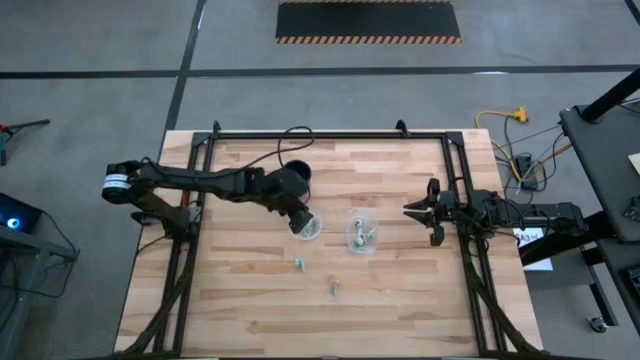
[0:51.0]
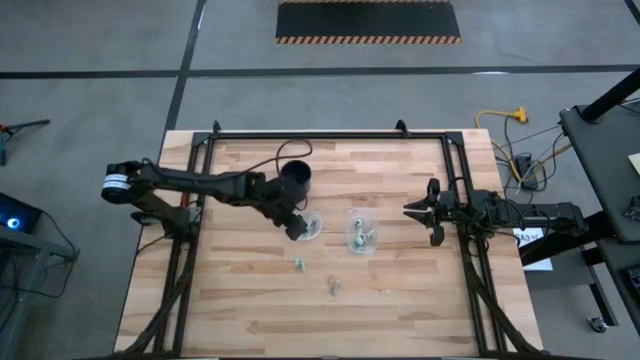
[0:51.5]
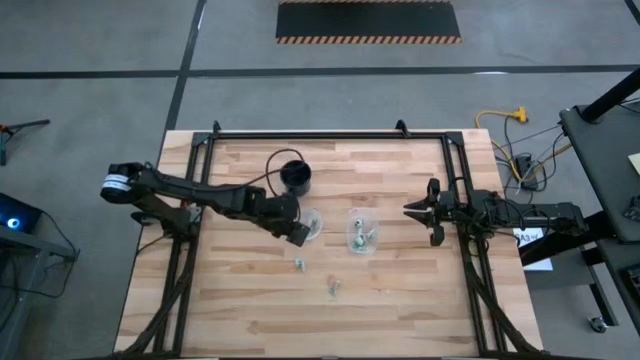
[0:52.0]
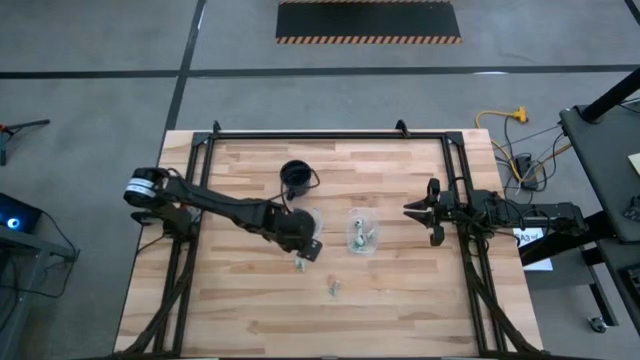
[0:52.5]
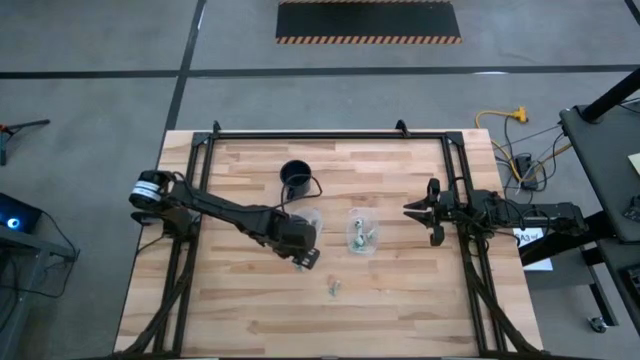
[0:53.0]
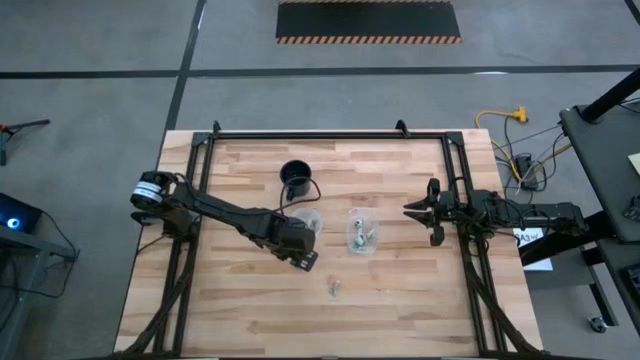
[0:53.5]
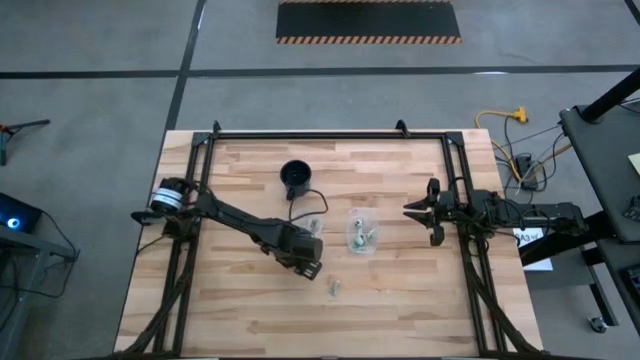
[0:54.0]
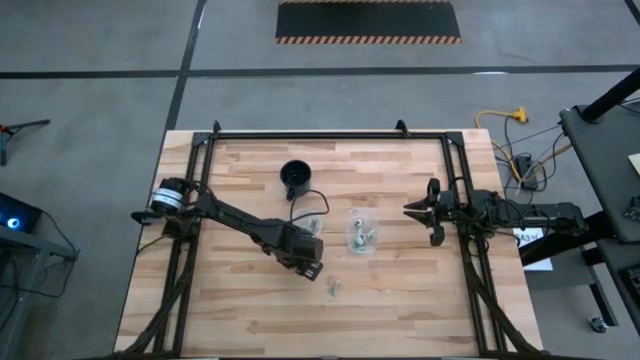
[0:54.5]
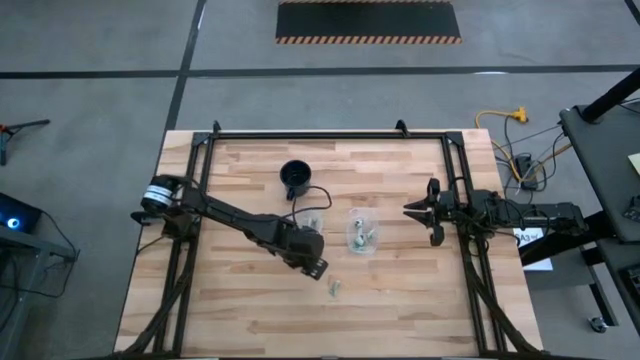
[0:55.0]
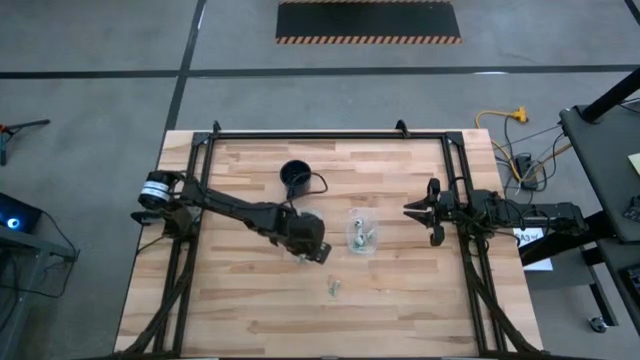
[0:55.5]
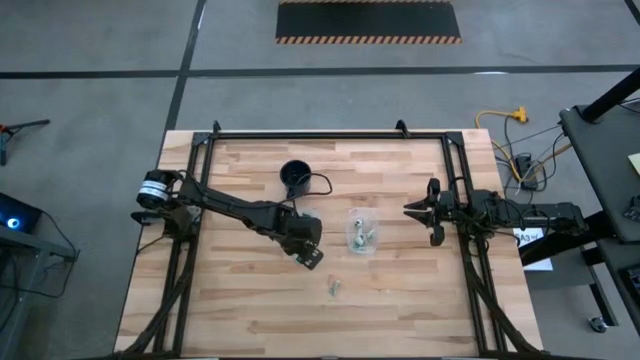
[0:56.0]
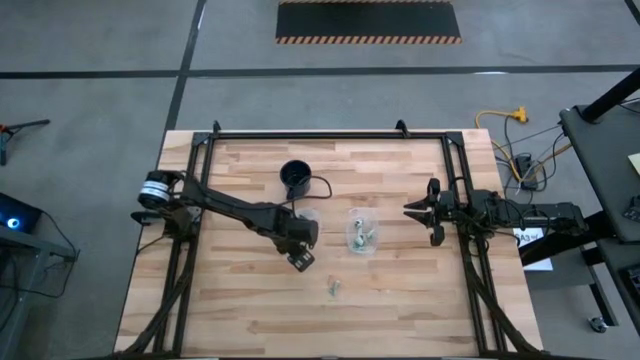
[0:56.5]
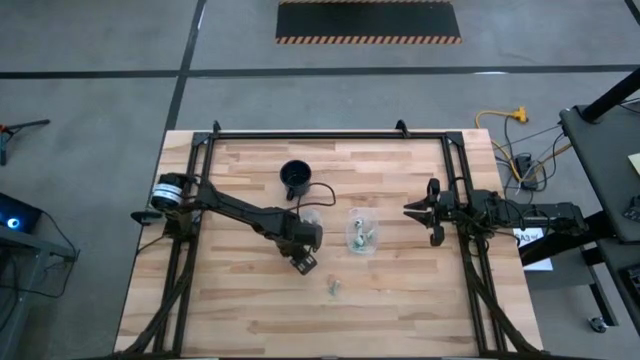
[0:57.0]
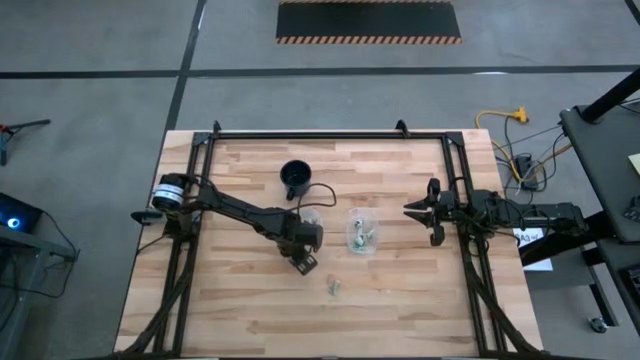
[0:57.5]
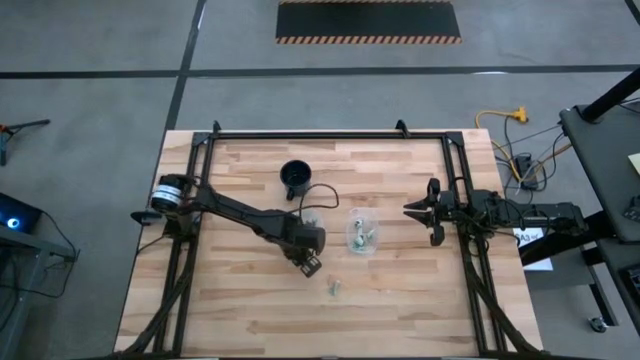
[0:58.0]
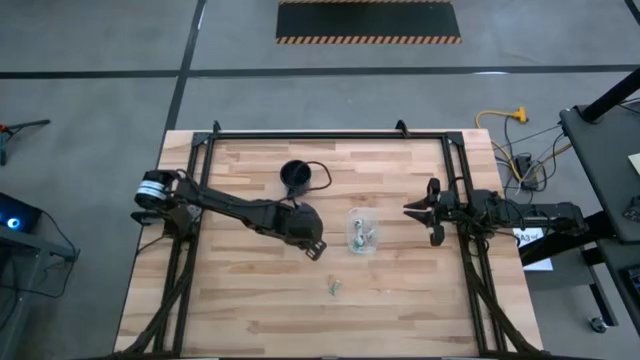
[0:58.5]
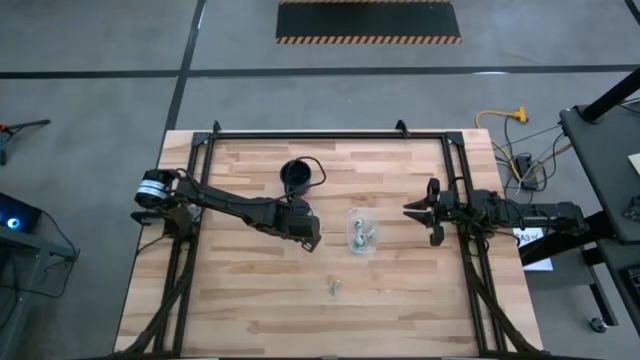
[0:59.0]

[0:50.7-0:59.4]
Task: Pick and place Stevia / Truvia into bins
Put the stevia packet into the round transparent container

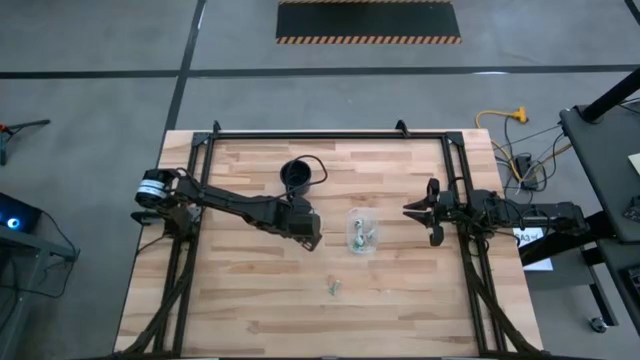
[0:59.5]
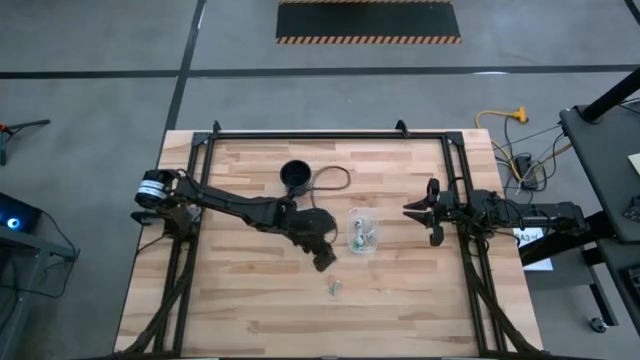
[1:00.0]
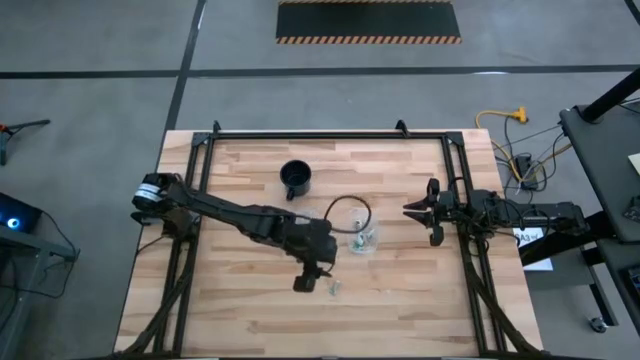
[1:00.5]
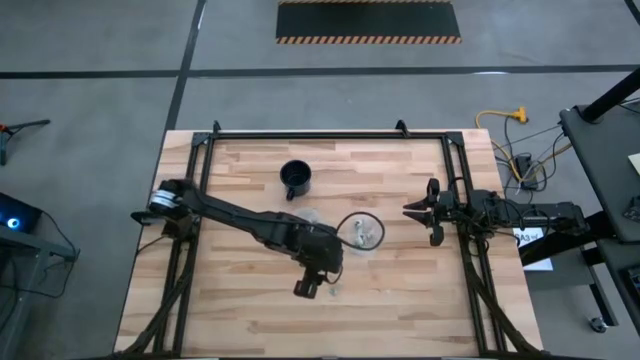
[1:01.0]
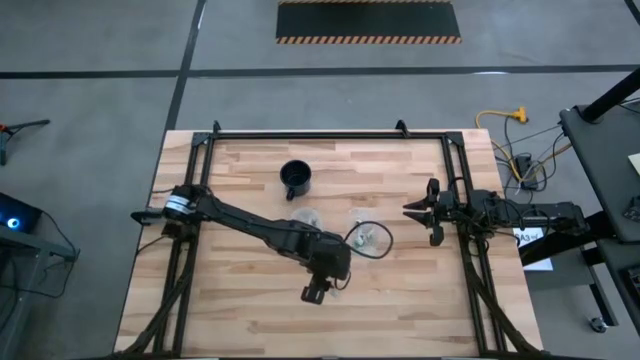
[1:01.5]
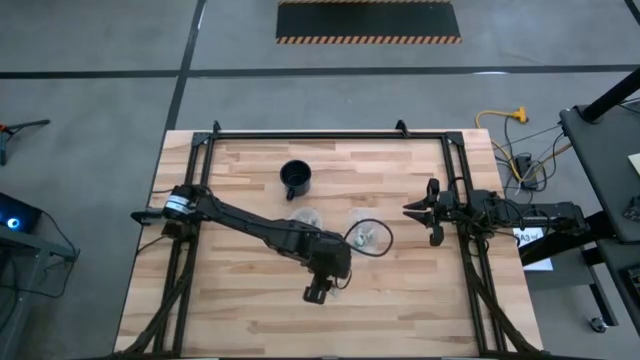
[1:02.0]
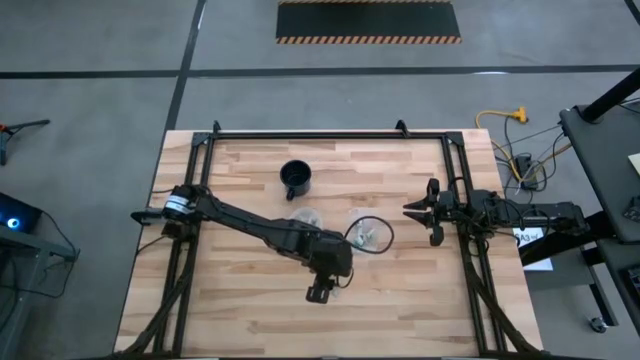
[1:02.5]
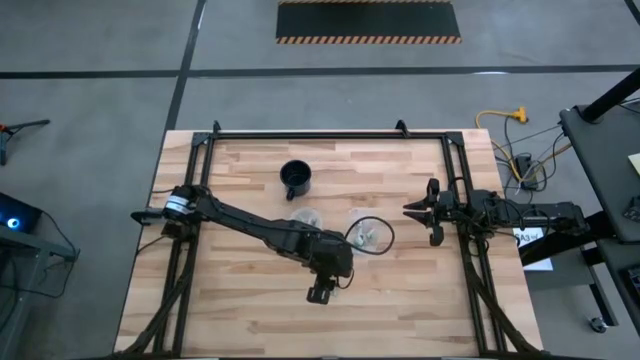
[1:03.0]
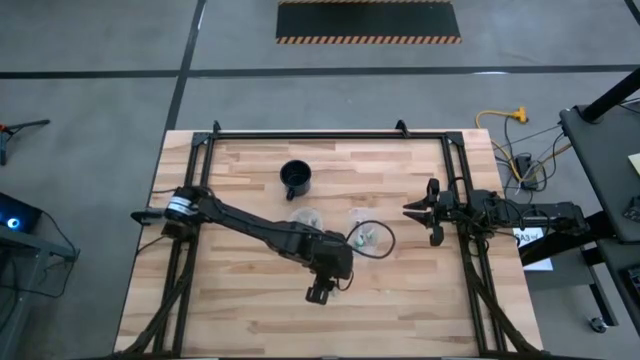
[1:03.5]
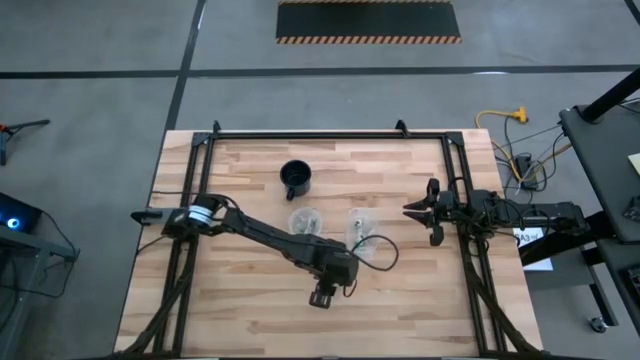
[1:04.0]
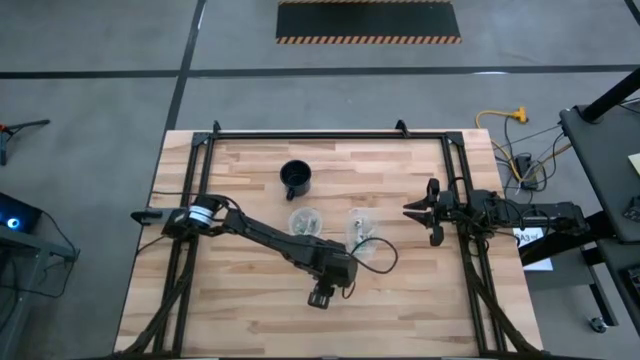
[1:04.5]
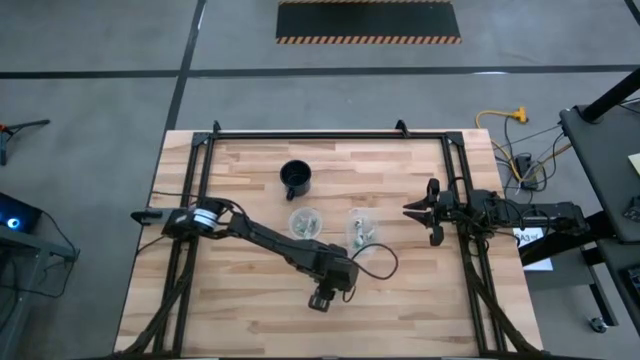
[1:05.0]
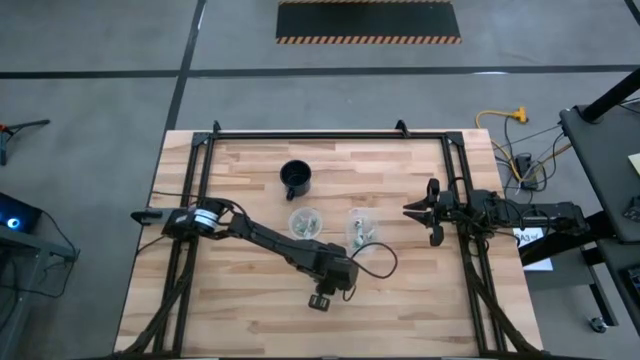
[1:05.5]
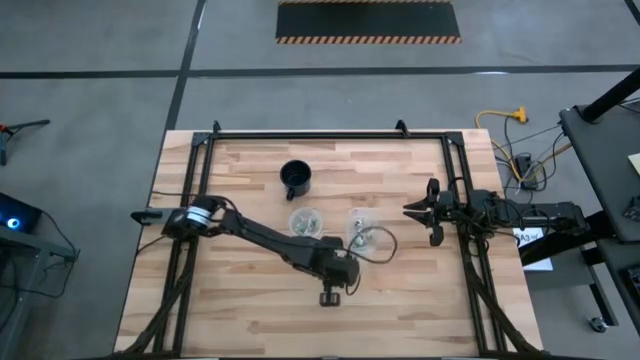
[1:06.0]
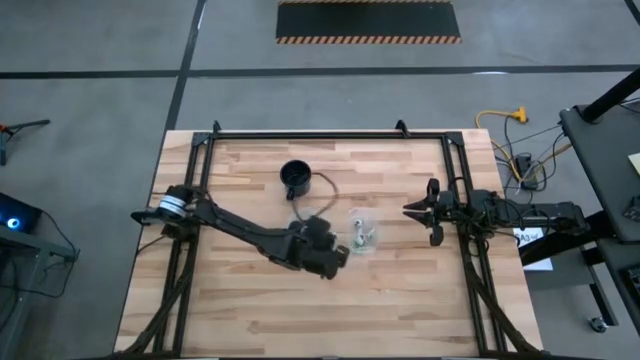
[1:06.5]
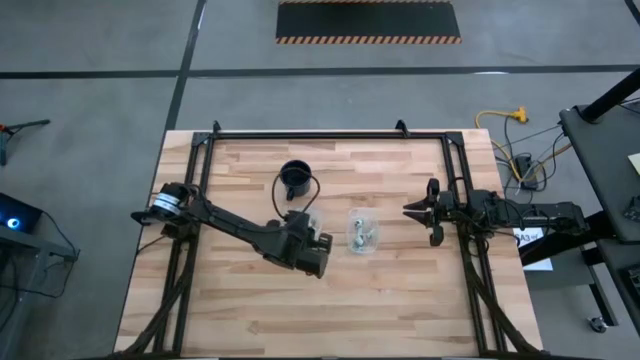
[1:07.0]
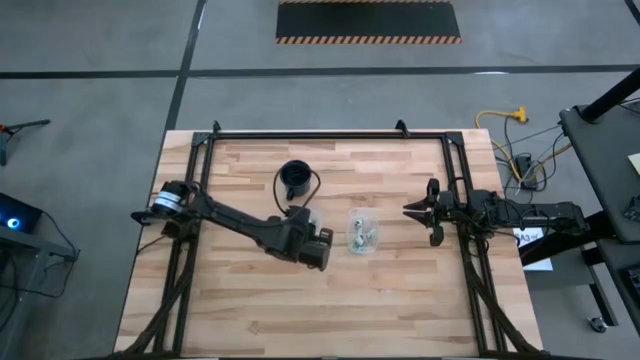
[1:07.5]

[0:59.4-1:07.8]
Put the stevia packet into the round transparent container

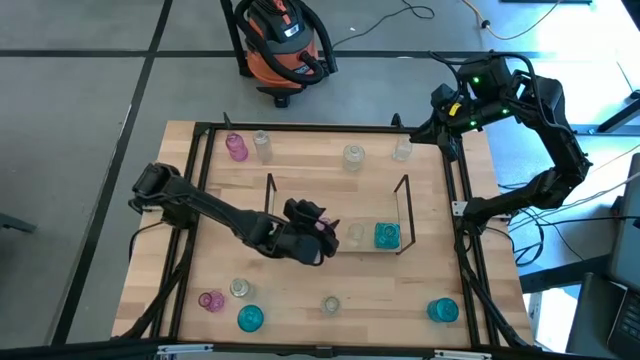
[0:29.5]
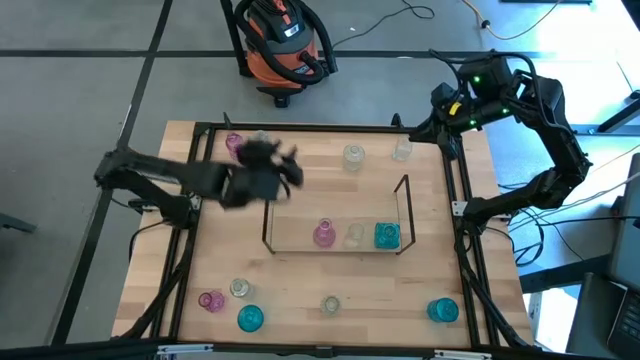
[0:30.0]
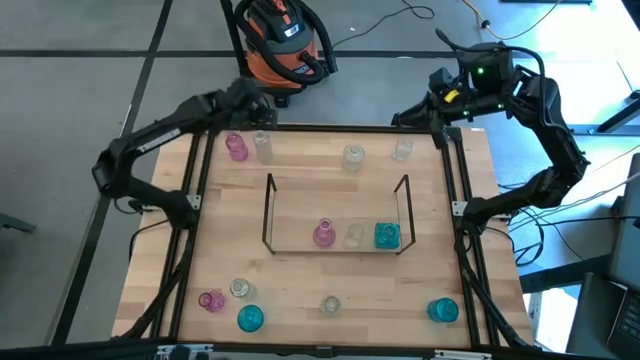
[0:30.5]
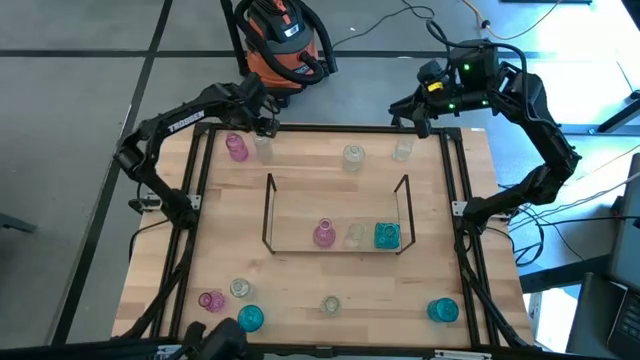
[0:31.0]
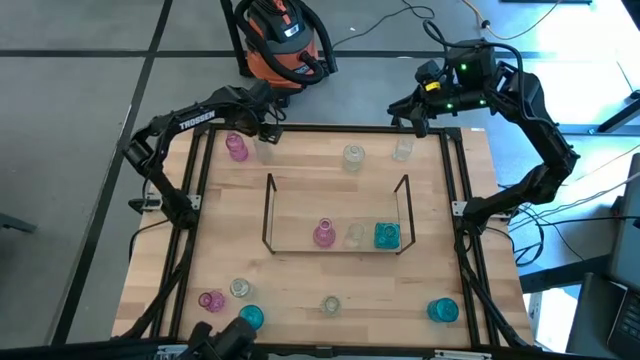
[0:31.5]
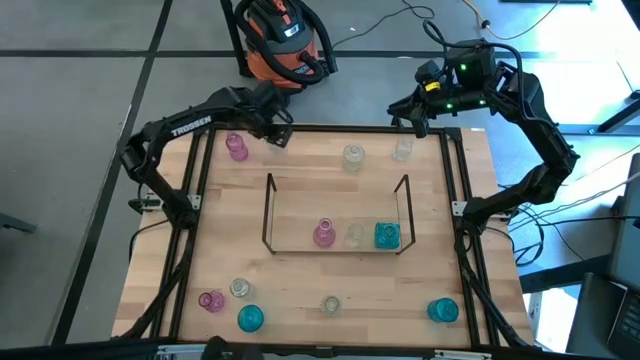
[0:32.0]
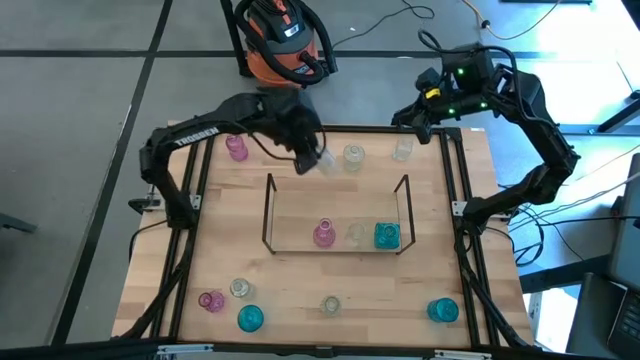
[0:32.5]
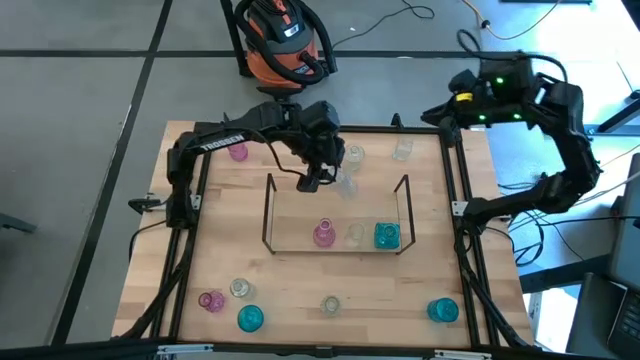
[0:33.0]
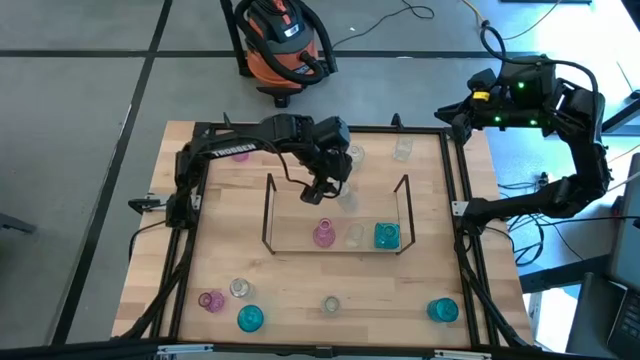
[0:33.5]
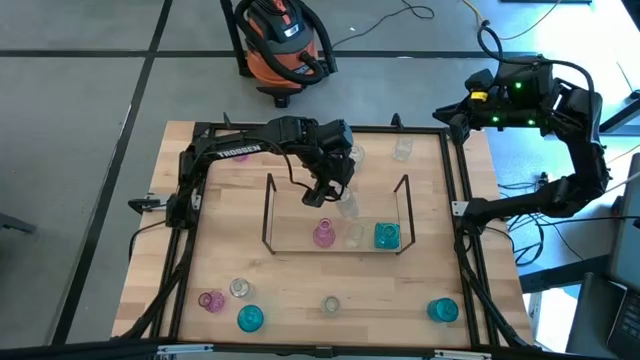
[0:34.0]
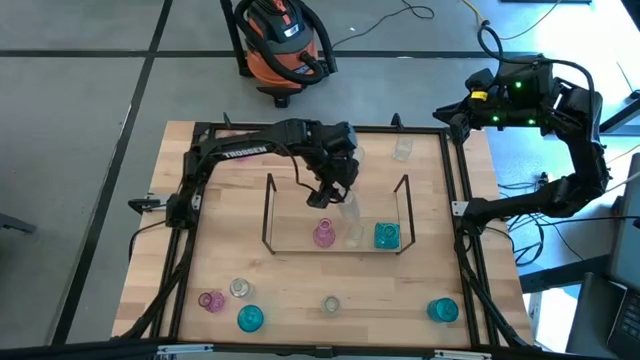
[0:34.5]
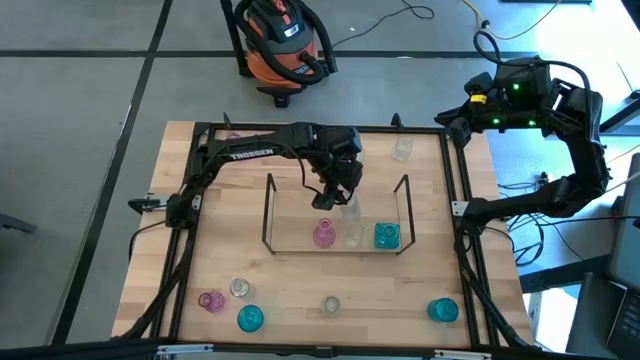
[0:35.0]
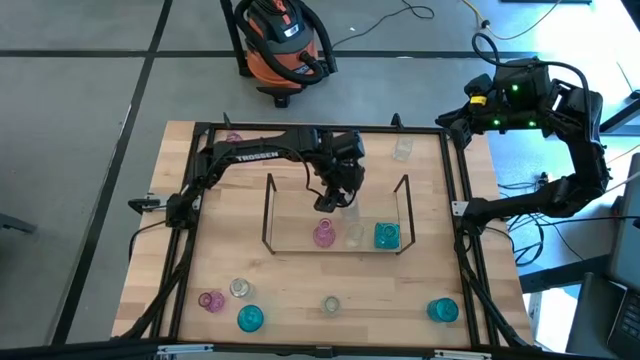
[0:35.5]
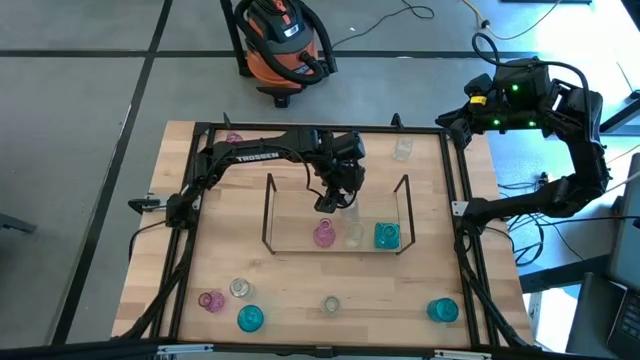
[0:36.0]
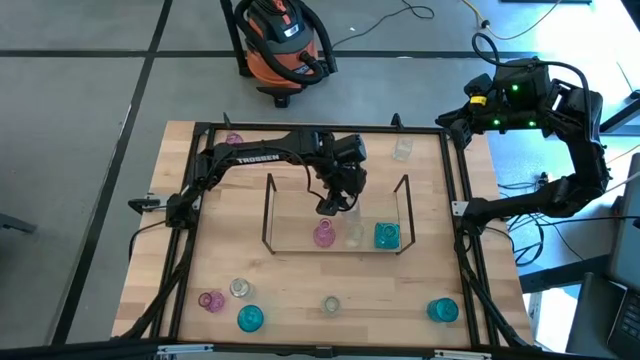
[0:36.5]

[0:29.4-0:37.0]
Task: sort vases onto shelf
Put the transparent vase aligned with the other transparent vase on the shelf
